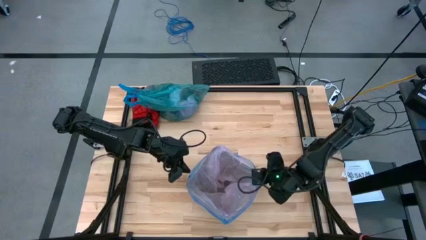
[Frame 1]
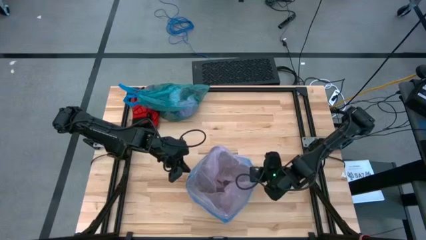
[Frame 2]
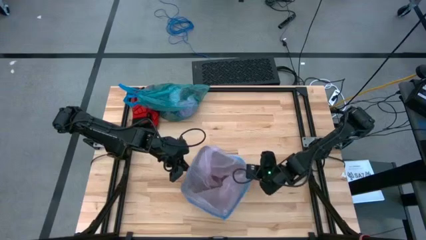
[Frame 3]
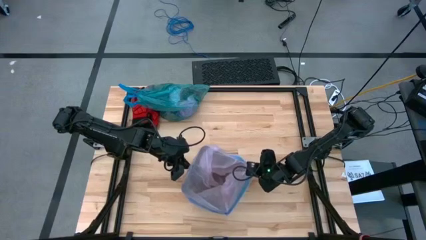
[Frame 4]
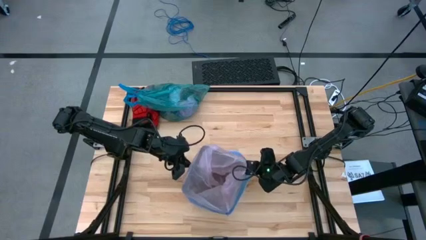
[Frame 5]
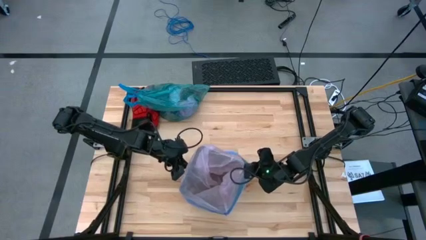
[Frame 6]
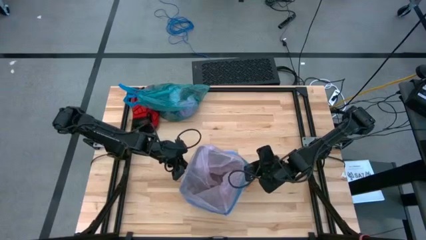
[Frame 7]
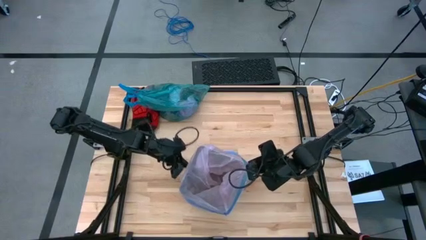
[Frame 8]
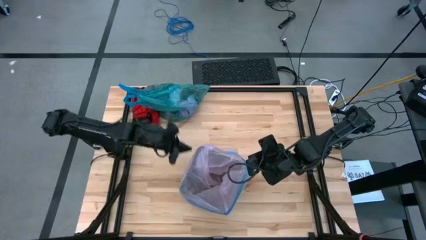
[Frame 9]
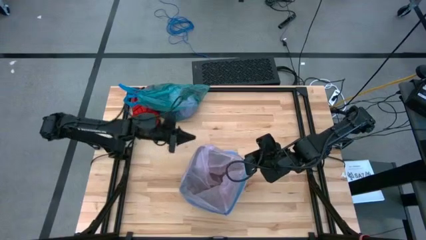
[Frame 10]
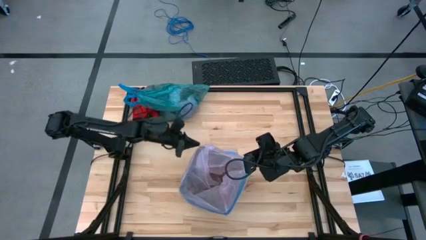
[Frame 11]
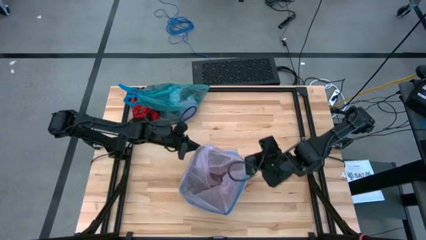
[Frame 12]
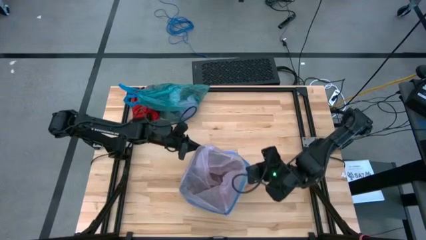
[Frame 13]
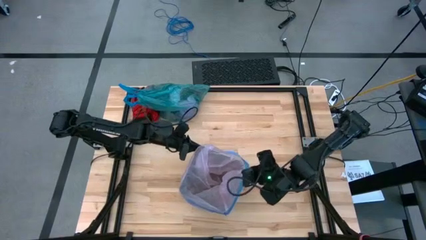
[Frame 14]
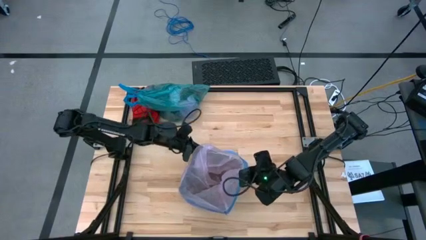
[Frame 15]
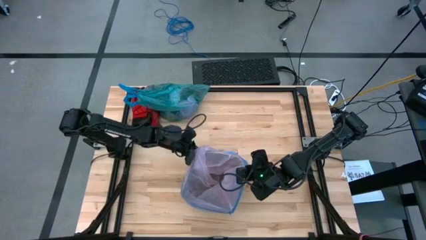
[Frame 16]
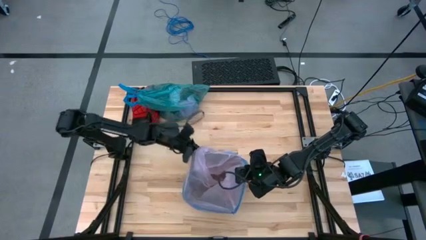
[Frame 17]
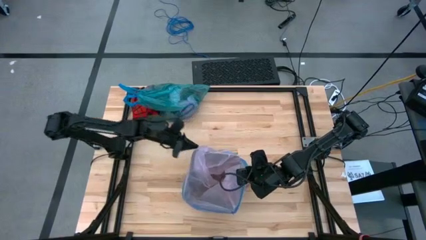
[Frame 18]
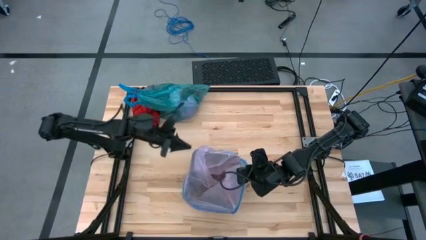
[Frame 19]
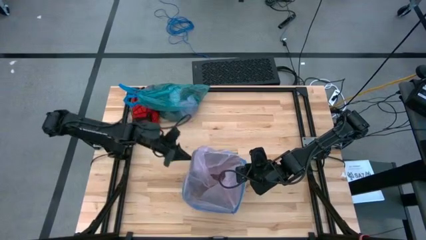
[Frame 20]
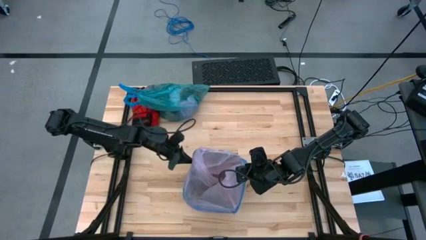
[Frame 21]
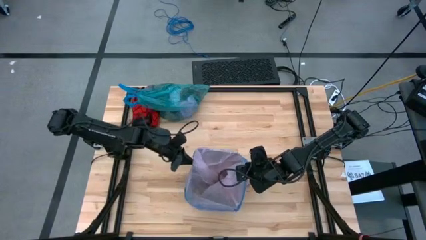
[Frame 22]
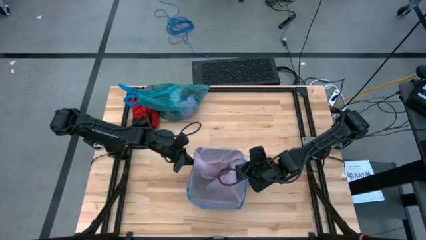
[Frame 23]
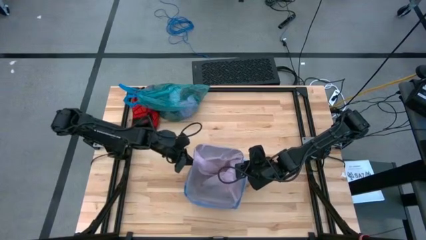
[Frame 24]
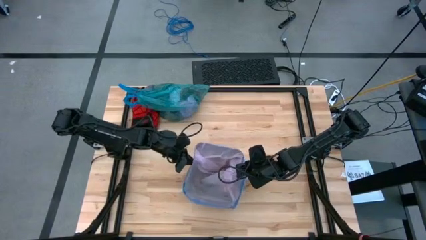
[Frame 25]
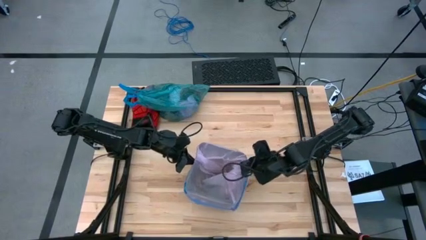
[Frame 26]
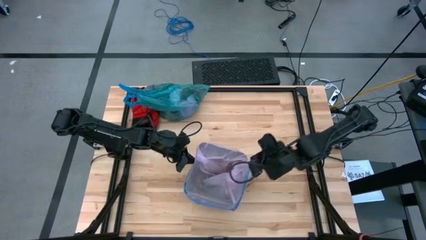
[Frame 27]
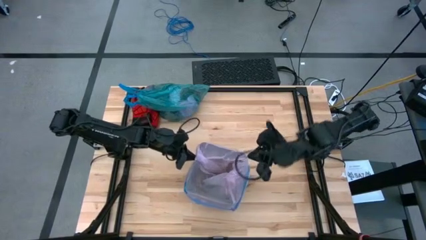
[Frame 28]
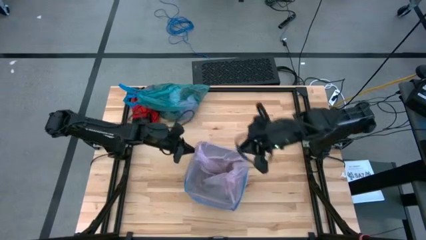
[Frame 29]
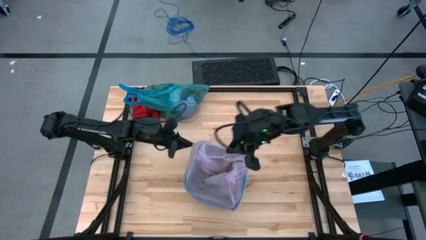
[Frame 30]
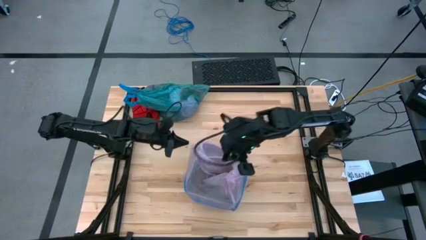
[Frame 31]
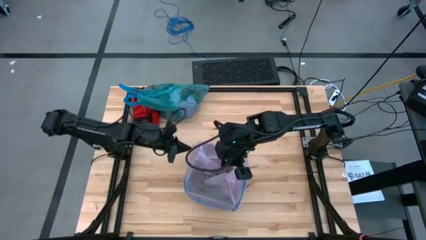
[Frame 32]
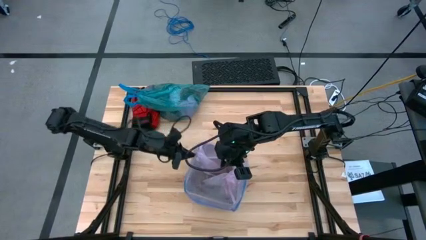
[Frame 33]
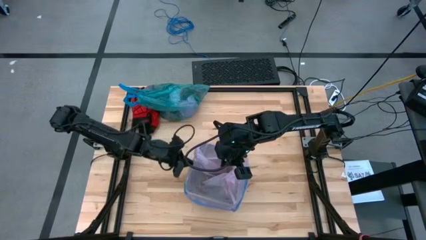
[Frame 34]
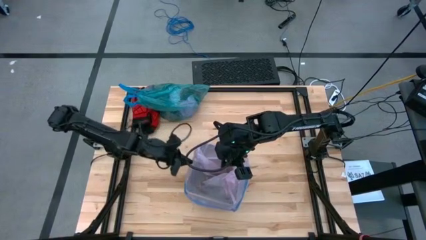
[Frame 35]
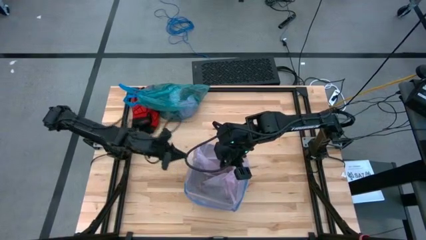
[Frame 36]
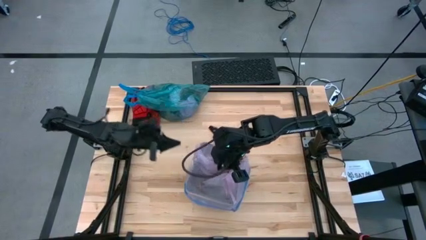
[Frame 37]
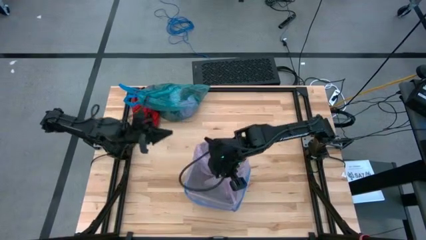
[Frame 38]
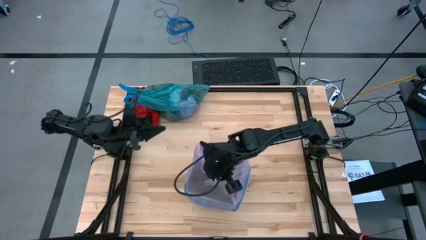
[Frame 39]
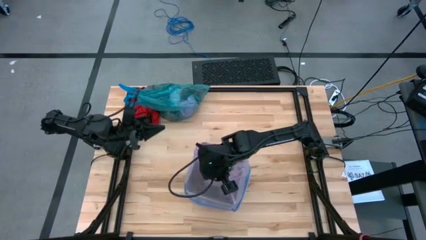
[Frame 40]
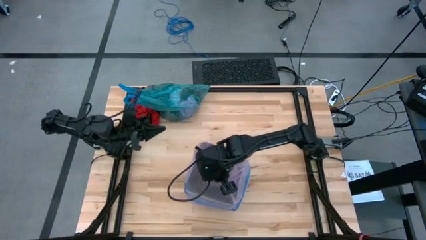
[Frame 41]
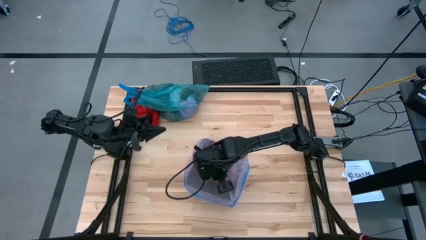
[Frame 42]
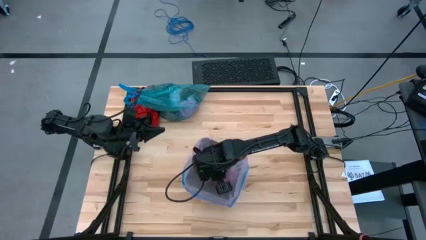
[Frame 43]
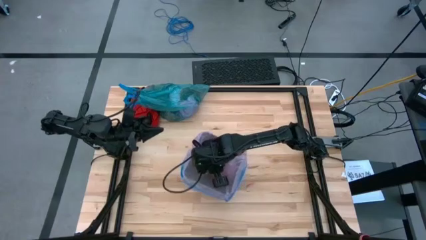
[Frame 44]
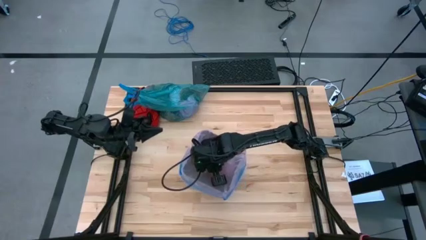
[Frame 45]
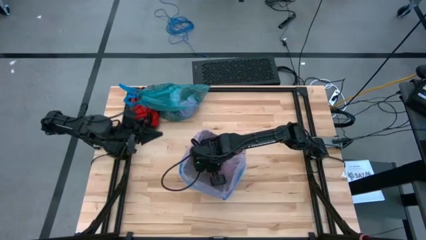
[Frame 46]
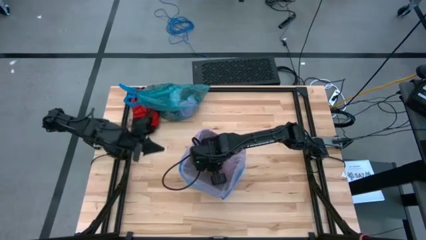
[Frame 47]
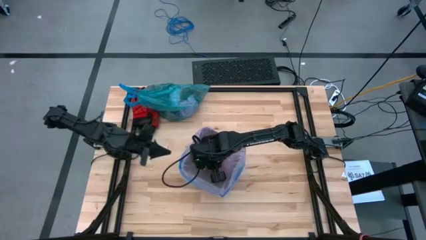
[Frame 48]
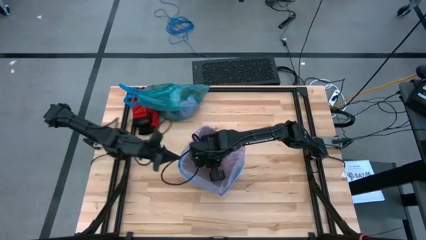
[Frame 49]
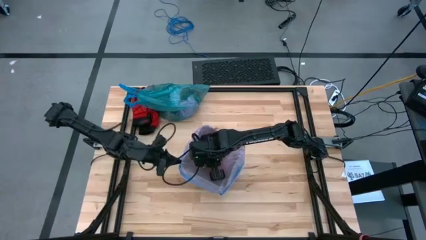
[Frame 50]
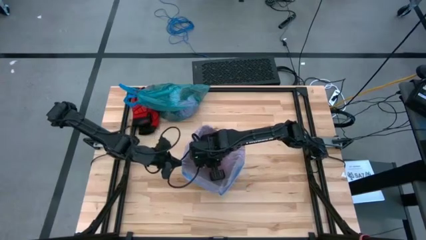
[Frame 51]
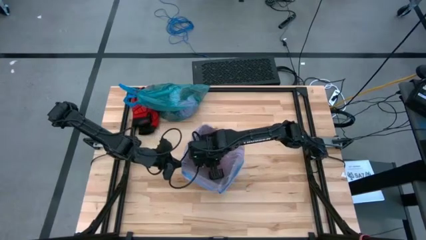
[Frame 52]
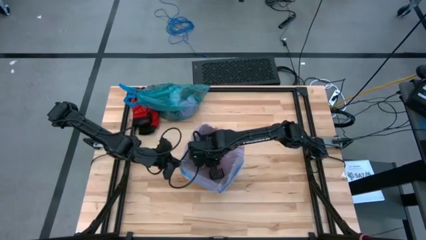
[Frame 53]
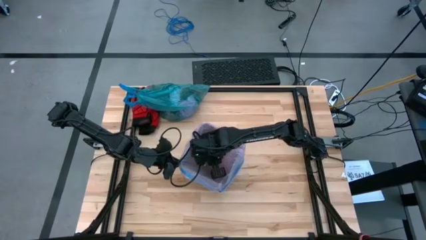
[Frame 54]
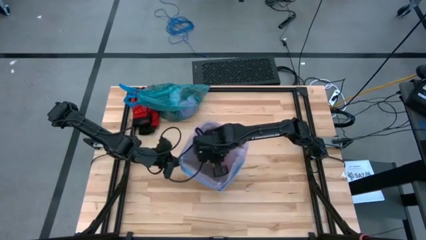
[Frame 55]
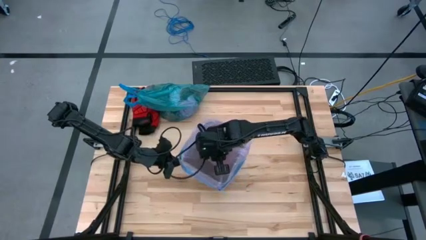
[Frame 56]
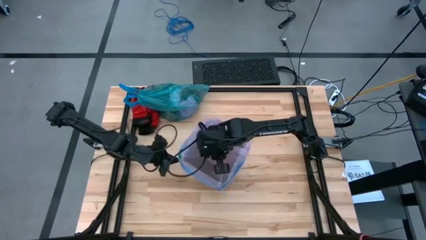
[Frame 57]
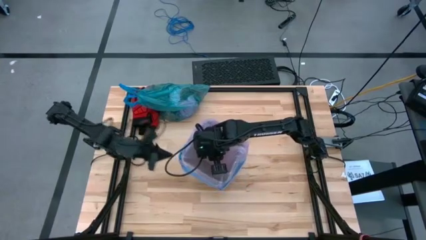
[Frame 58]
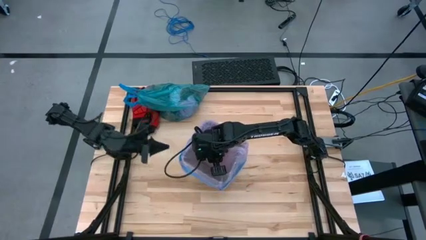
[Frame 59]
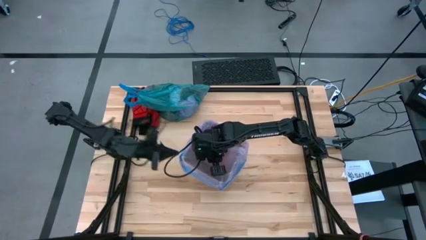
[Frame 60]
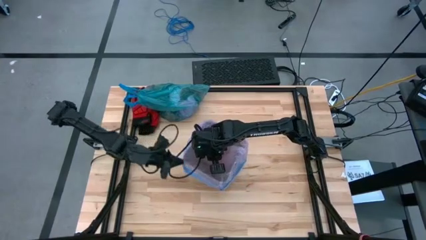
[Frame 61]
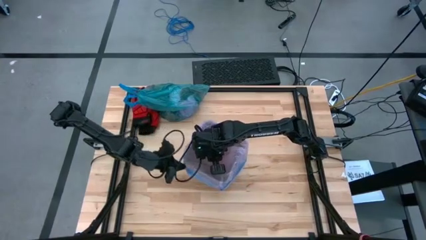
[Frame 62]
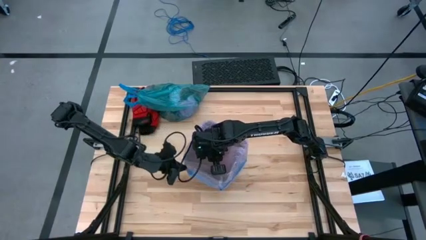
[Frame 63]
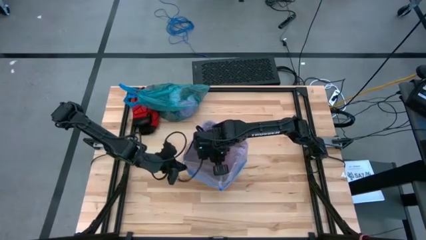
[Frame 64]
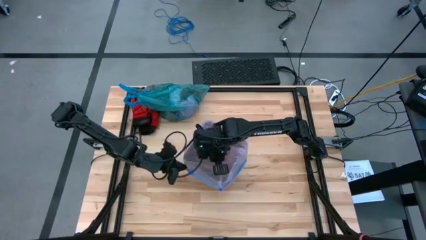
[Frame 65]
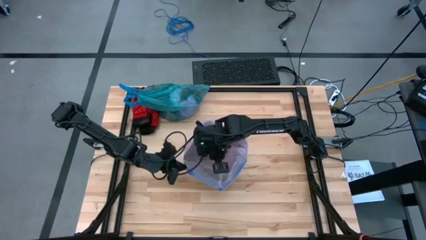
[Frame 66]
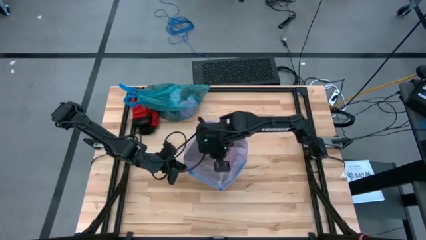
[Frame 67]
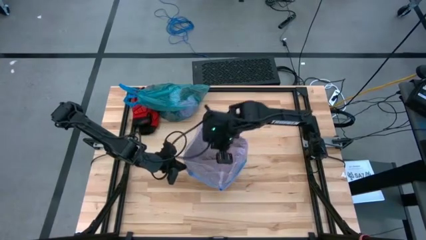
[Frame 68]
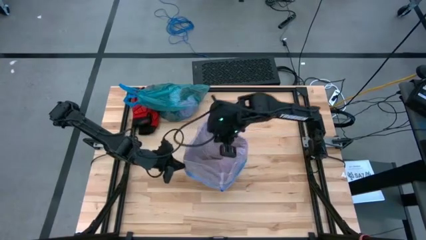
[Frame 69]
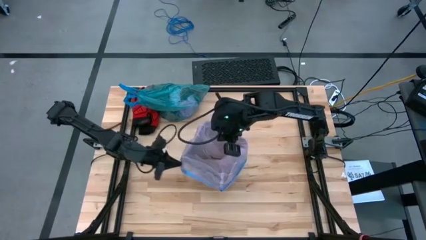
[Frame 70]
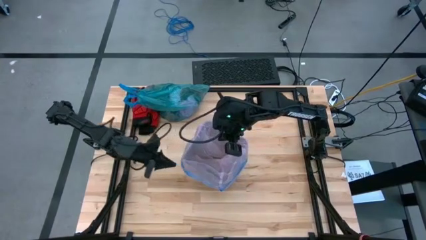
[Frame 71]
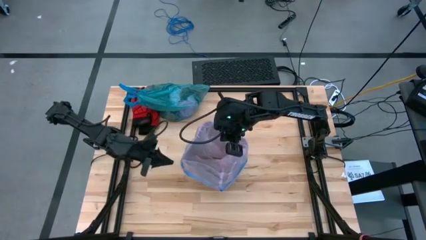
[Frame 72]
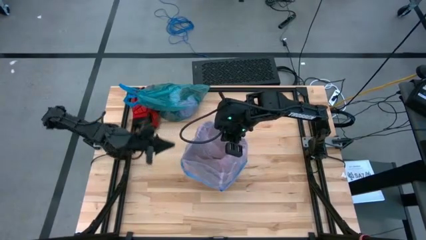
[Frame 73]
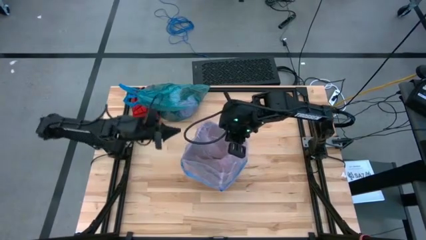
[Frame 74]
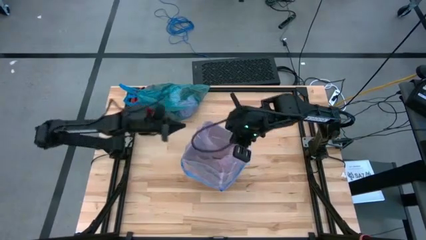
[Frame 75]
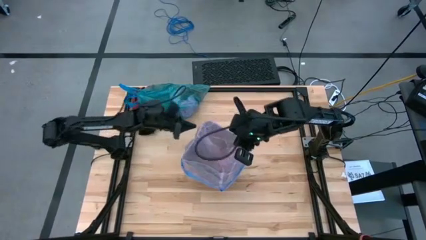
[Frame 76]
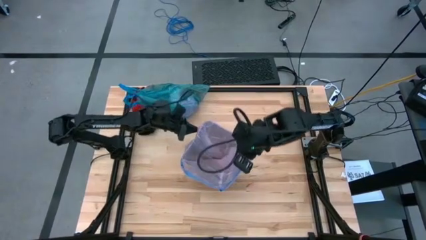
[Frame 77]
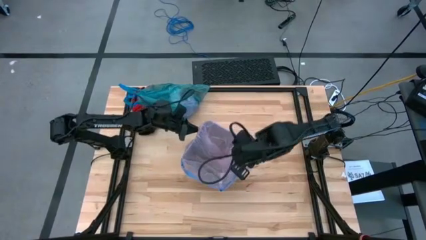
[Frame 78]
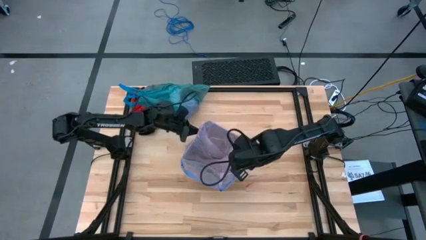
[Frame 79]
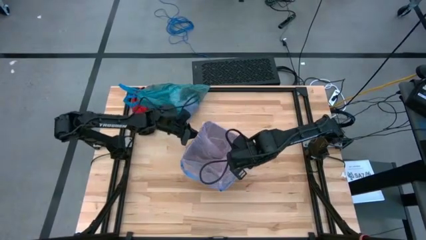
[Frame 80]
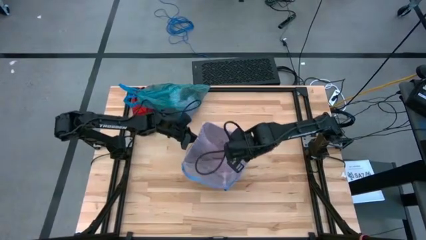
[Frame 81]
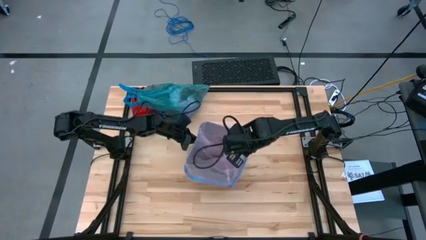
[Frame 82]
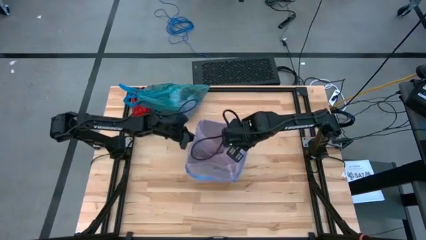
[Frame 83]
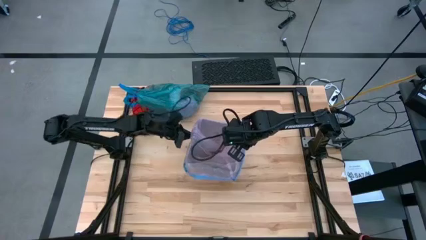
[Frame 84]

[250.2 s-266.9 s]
Task: place trash/remove bag and relplace
Insert the new pink trash bag into the black trash bin
